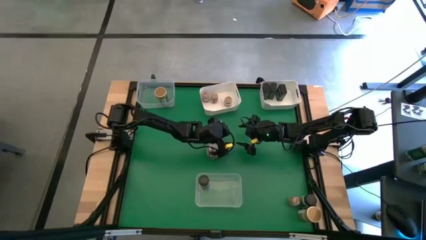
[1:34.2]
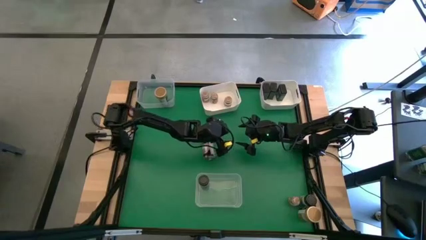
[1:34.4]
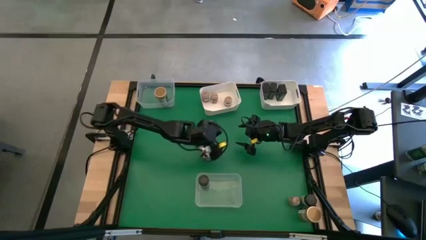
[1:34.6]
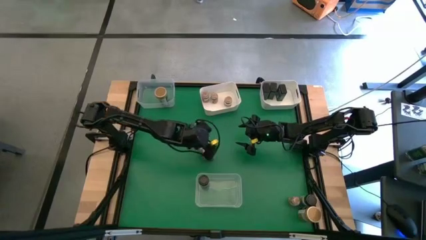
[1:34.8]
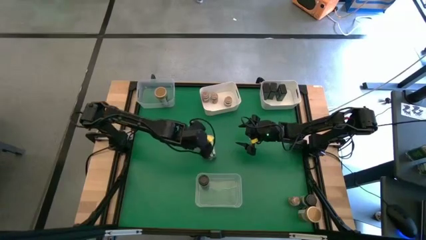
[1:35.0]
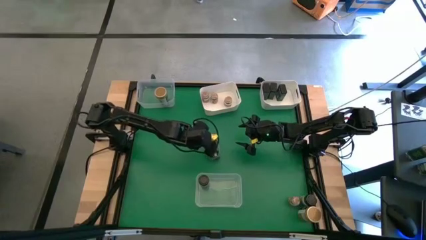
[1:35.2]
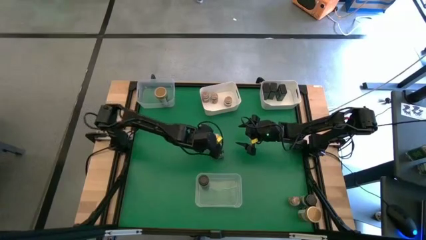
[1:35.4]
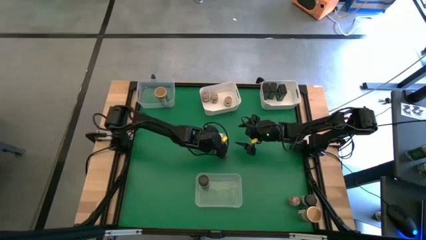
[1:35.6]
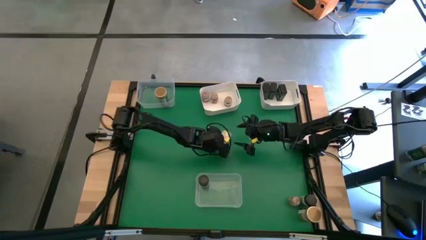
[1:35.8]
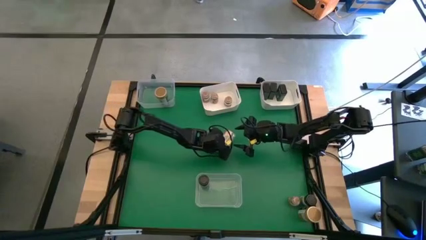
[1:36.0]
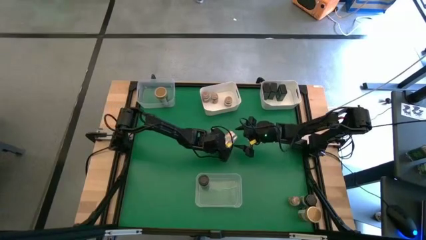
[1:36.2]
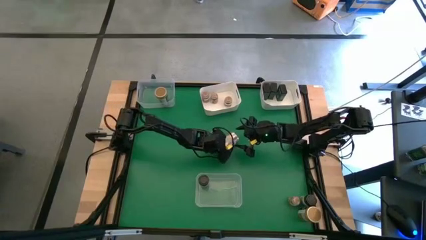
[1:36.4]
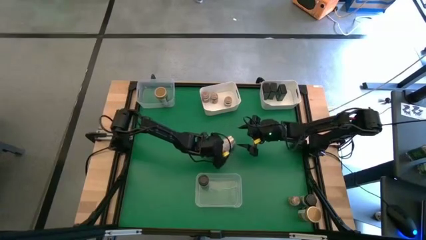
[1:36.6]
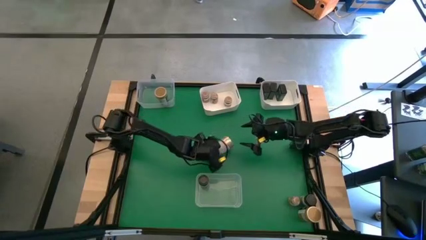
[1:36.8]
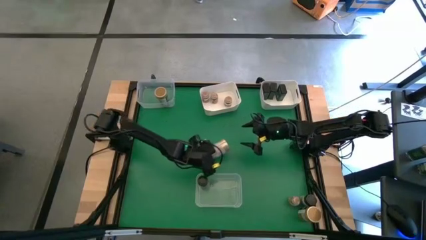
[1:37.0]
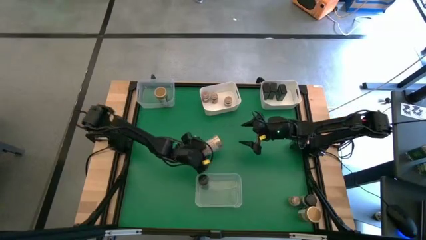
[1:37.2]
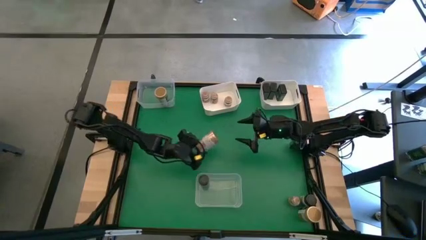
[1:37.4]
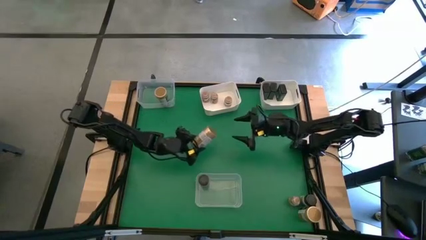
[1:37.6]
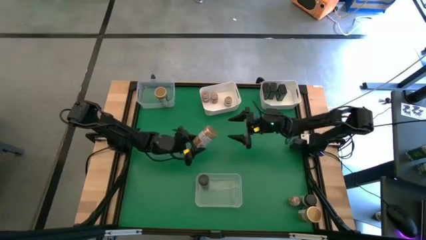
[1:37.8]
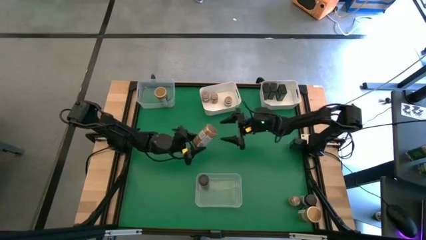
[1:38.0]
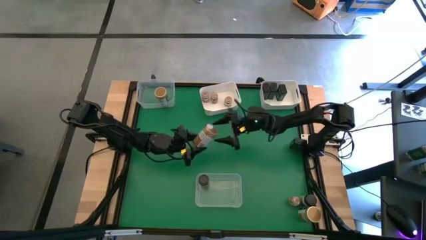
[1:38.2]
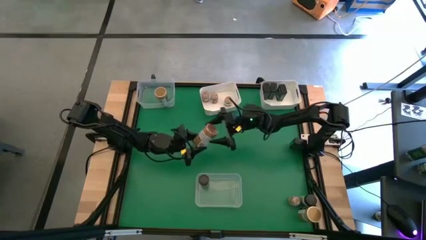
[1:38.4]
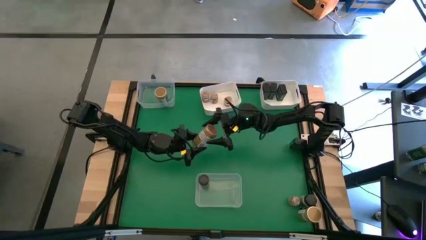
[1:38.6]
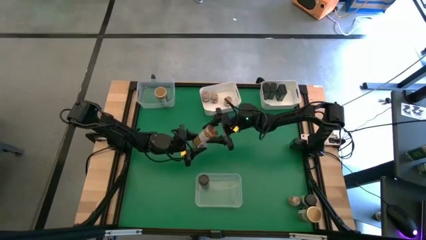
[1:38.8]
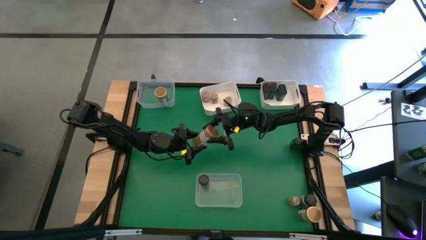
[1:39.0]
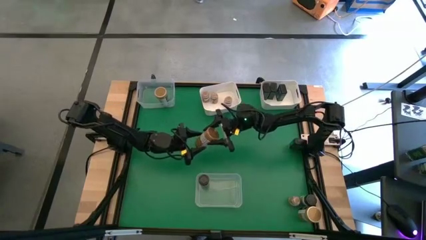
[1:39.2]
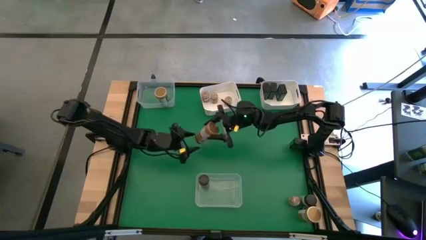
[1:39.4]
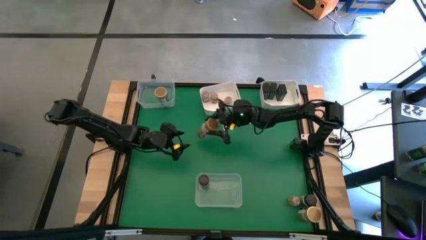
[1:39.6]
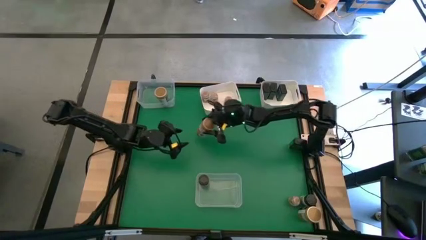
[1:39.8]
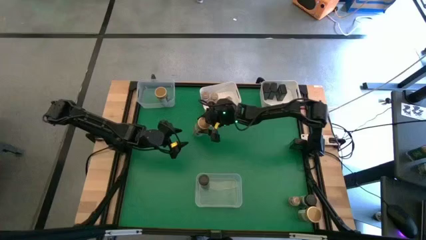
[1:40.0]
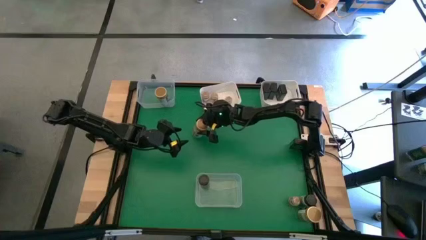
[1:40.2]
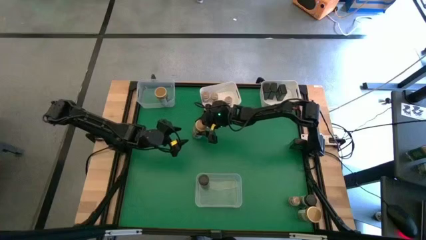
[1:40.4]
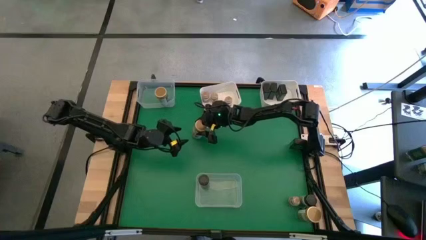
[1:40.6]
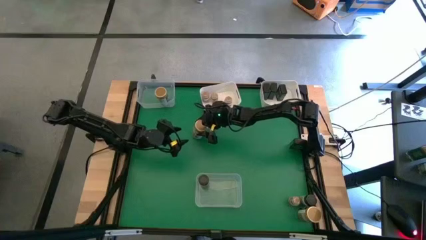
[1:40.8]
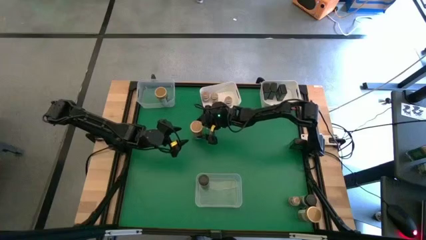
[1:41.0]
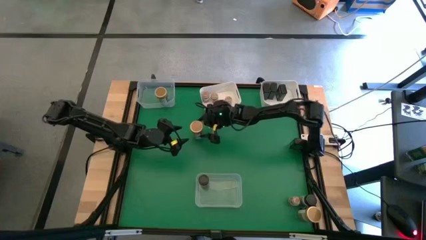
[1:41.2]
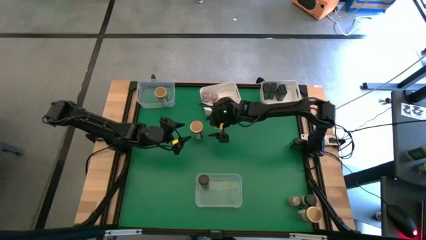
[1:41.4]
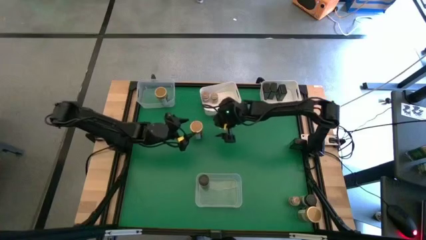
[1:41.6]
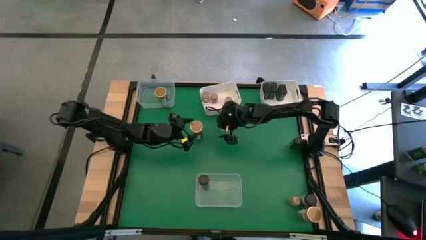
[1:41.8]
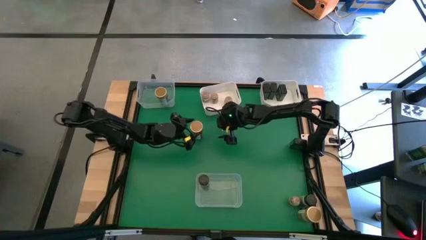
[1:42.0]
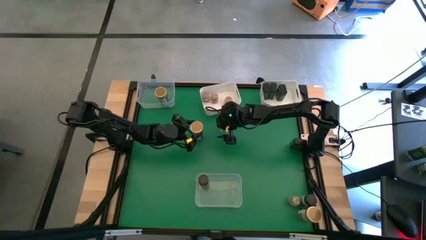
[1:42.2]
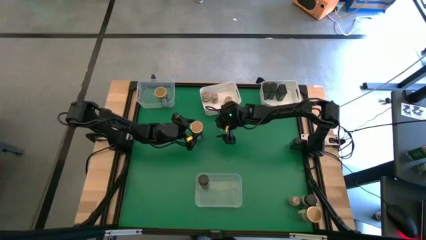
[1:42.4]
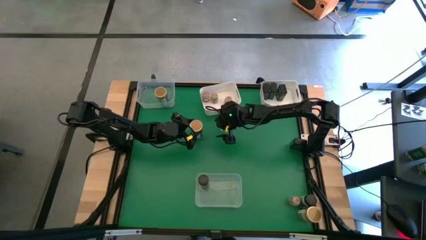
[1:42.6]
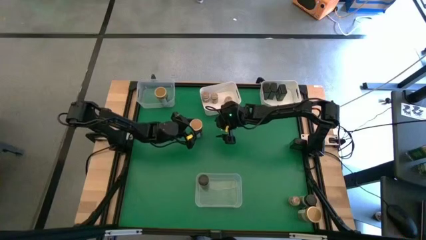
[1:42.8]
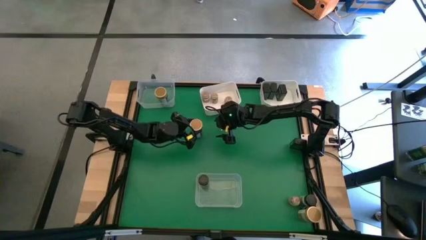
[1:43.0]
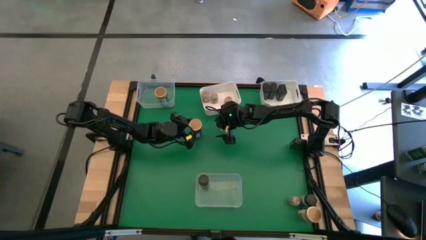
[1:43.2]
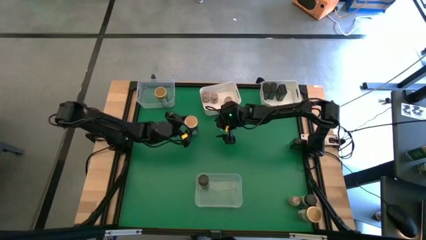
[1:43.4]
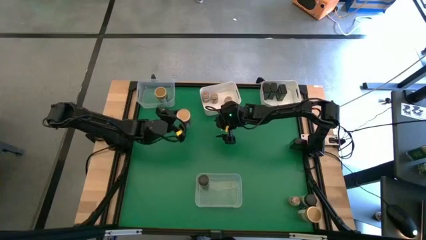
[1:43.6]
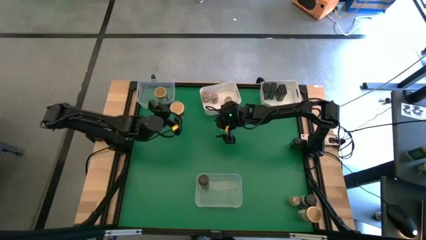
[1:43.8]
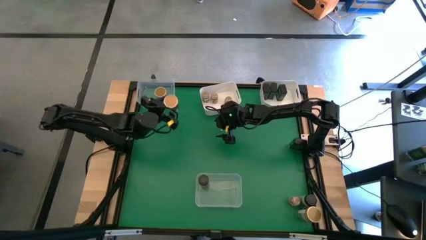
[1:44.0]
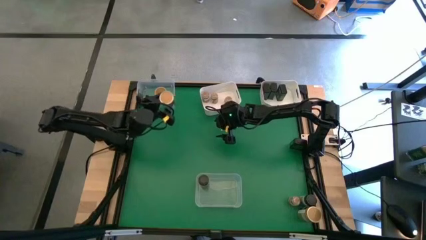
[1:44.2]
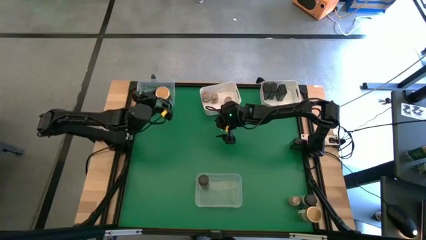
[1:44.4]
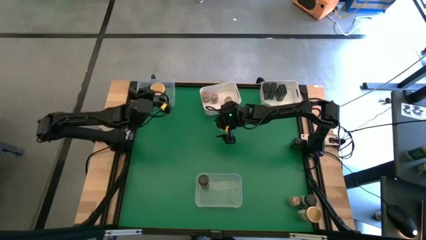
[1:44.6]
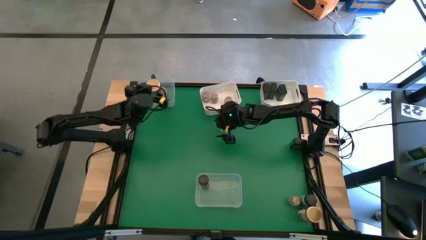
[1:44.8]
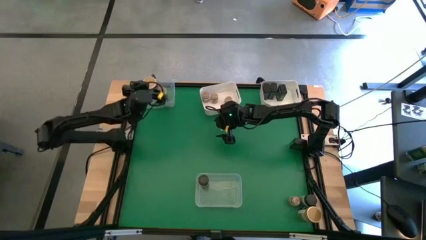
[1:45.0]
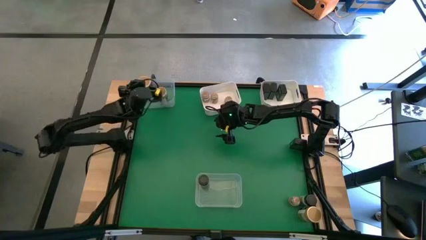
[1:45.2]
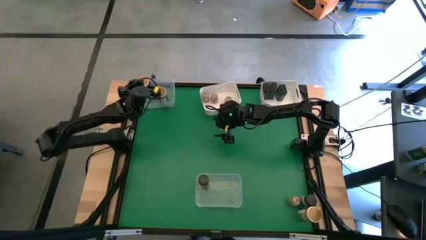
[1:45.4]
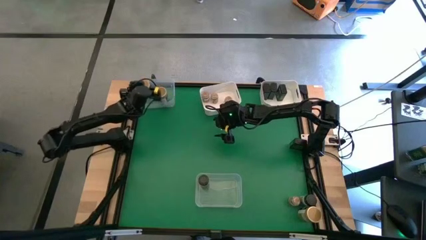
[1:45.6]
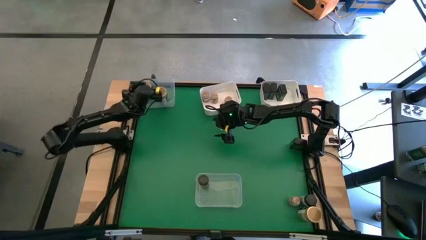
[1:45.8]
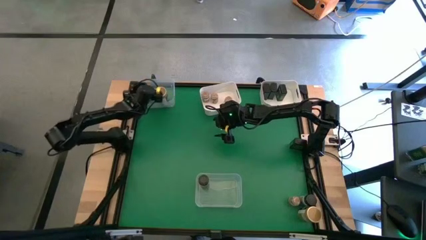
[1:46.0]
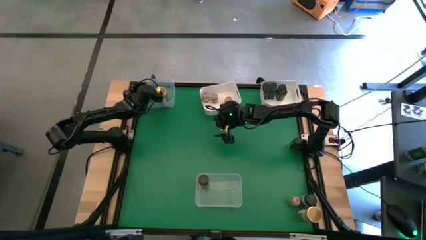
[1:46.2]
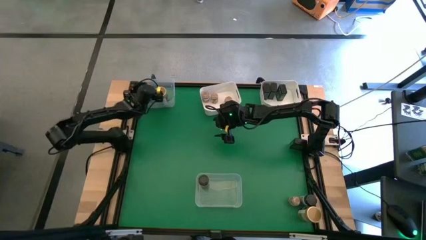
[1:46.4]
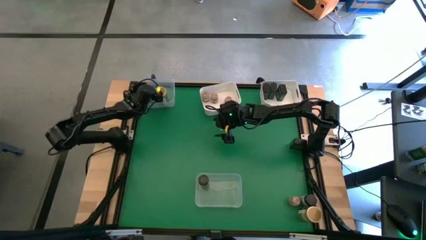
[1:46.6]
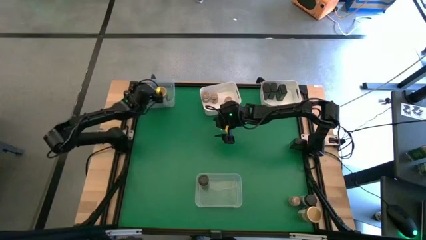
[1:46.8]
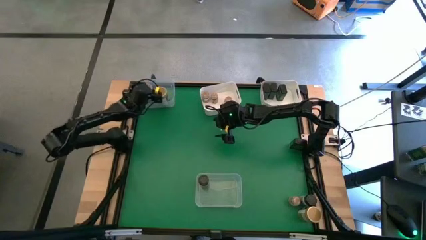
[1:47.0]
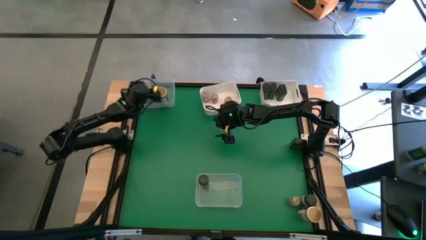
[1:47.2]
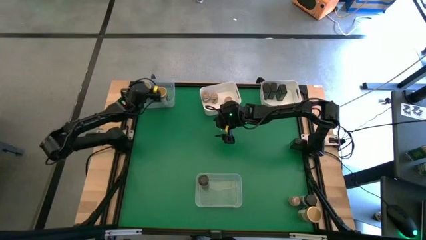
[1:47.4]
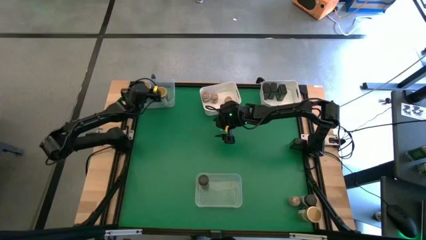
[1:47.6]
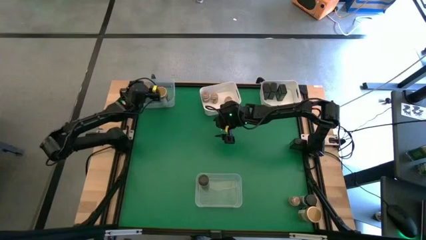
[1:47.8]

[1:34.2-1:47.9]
Task: Sort spices by type
Put the gold seasoning bottle into the top transparent bin

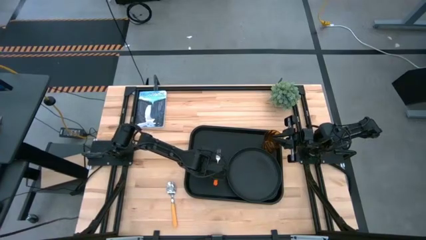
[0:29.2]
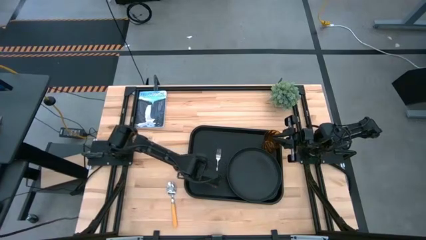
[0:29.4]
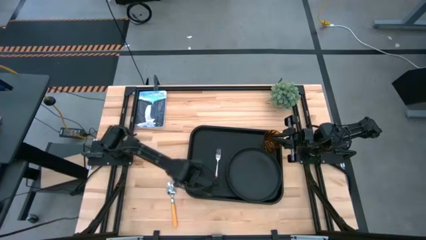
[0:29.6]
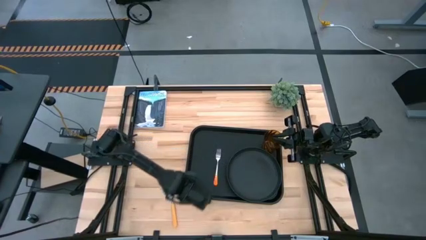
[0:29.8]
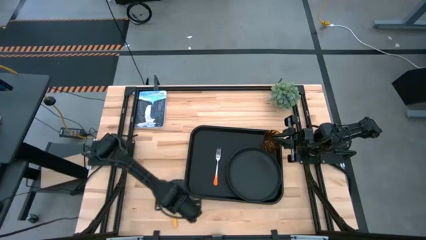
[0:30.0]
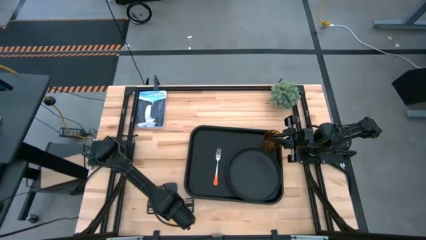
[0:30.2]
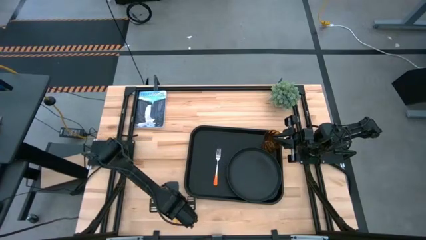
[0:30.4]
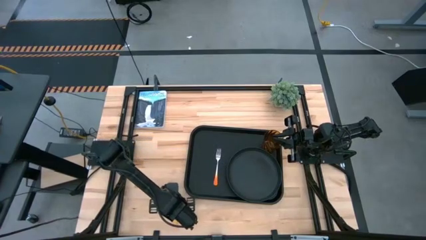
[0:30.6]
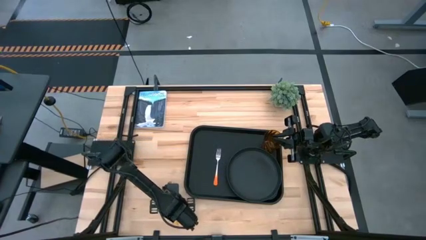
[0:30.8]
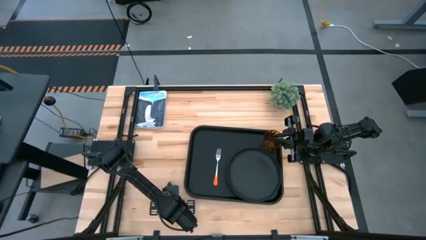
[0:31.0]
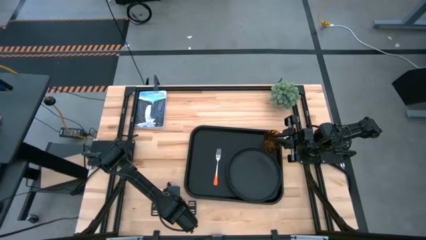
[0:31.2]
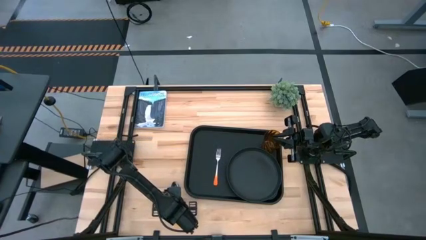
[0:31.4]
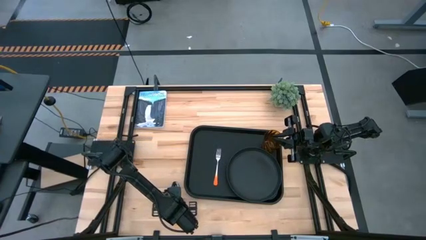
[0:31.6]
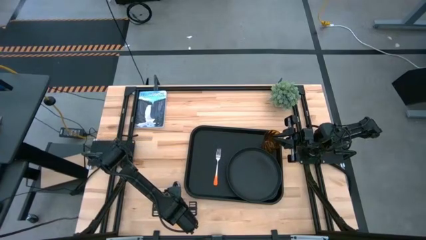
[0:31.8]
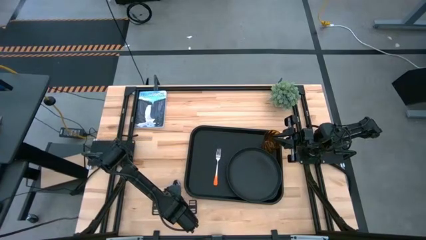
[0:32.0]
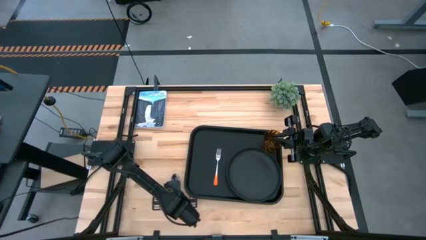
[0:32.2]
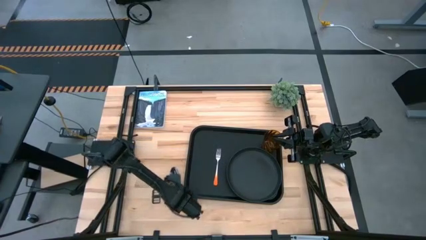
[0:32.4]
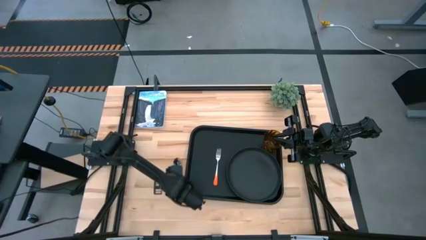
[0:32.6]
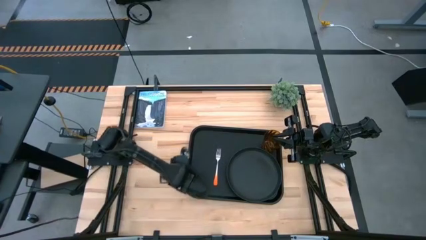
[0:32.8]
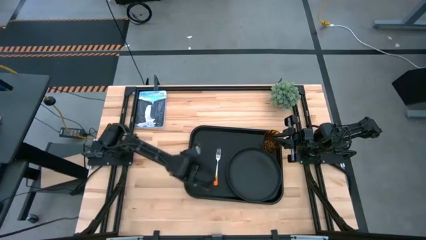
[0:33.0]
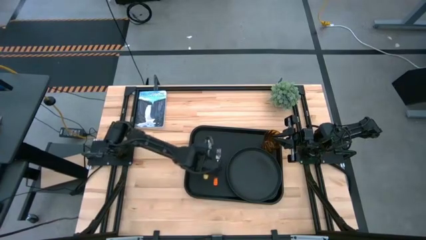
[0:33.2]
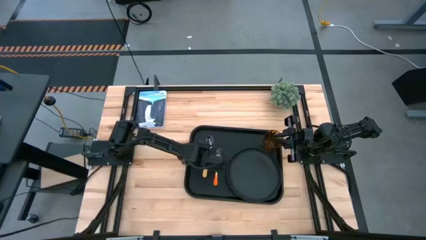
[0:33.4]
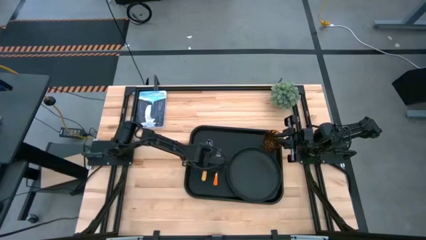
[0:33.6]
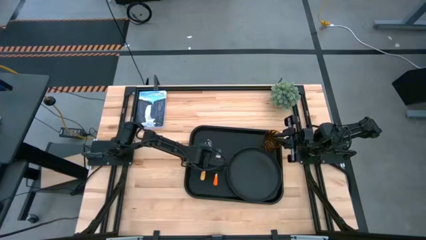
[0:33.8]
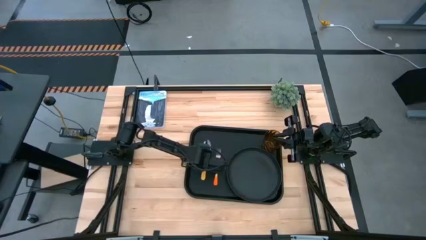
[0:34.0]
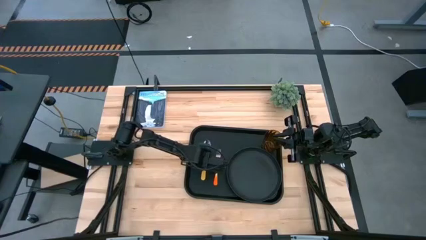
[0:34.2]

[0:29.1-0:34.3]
Task: Pick and place plate/cup/fork/spoon on tray
Put the yellow spoon on the black tray to the left of the orange fork
